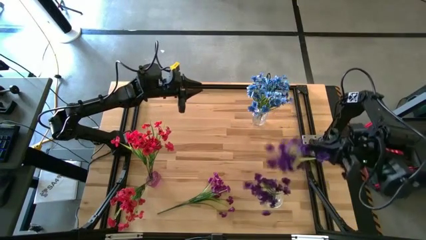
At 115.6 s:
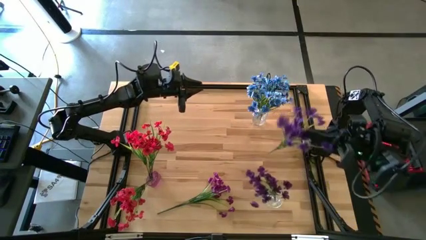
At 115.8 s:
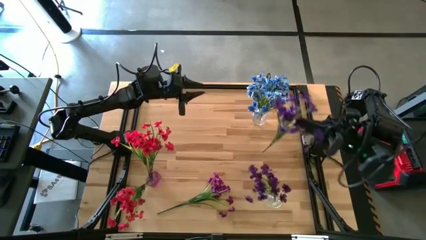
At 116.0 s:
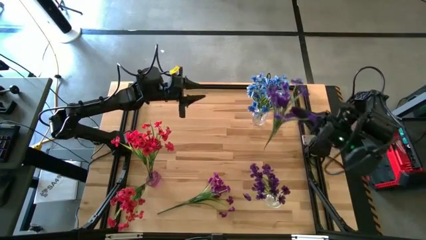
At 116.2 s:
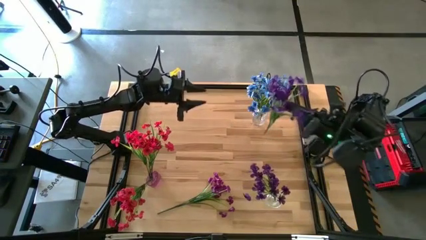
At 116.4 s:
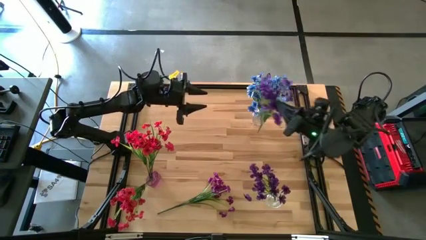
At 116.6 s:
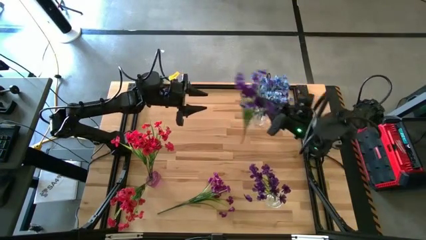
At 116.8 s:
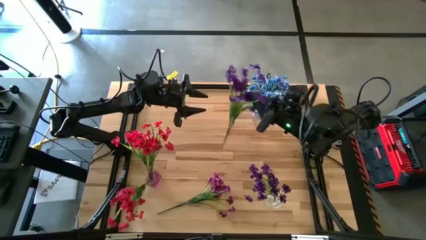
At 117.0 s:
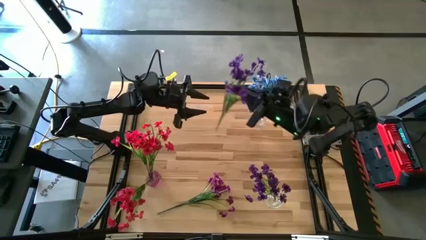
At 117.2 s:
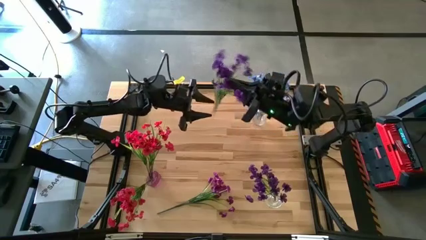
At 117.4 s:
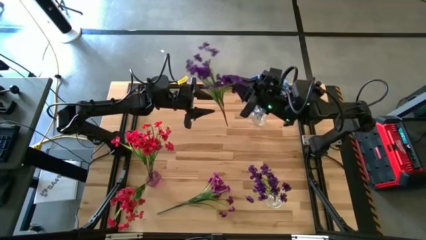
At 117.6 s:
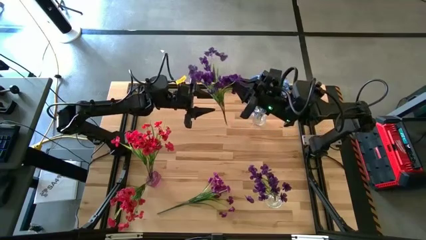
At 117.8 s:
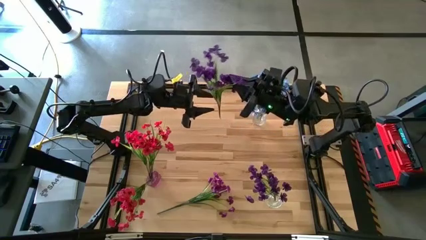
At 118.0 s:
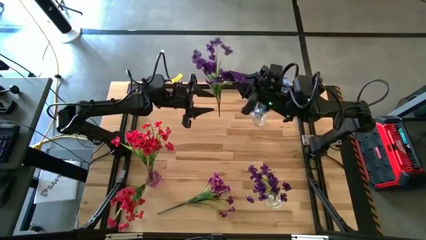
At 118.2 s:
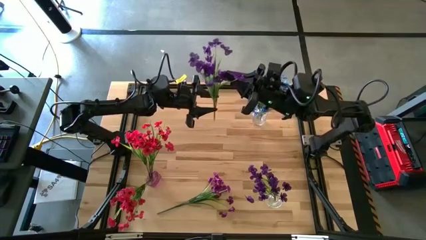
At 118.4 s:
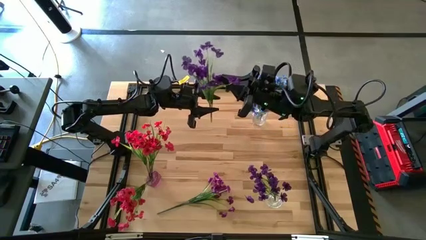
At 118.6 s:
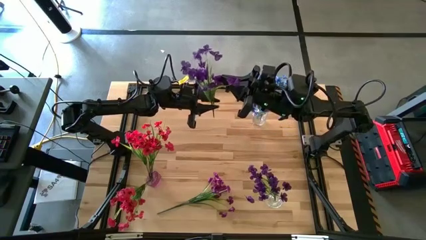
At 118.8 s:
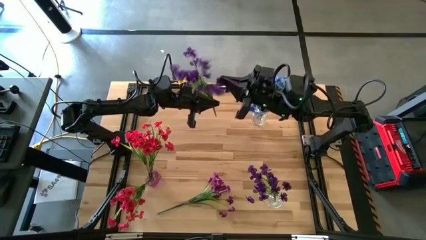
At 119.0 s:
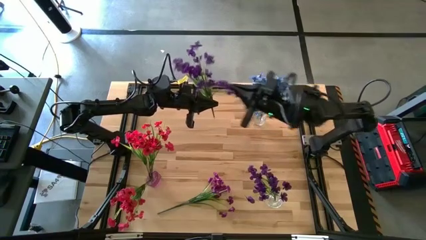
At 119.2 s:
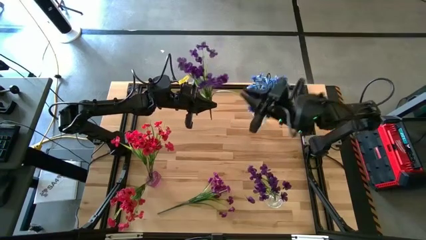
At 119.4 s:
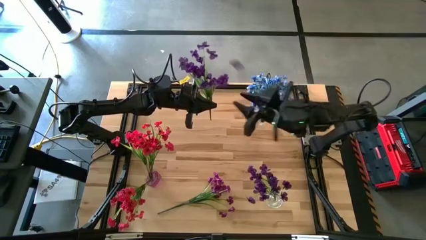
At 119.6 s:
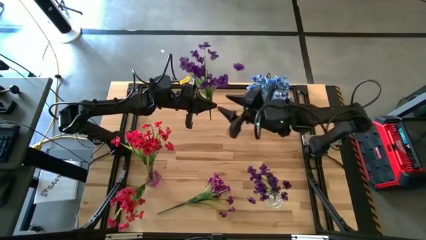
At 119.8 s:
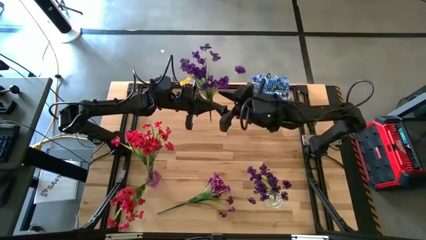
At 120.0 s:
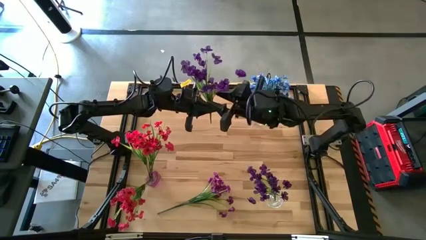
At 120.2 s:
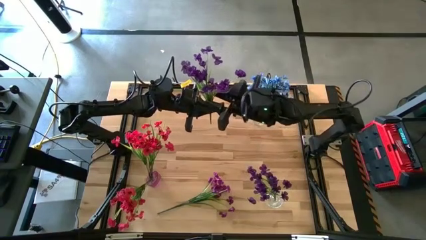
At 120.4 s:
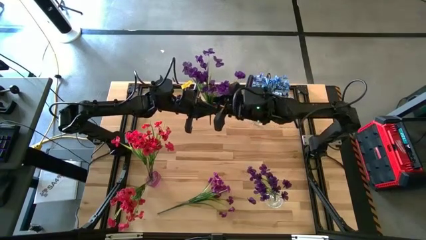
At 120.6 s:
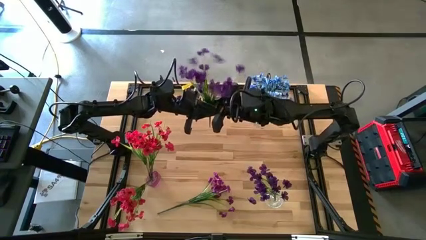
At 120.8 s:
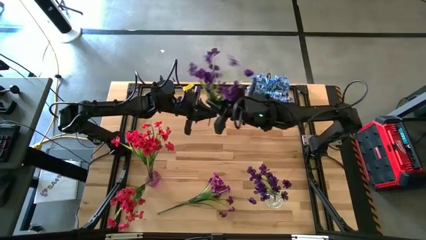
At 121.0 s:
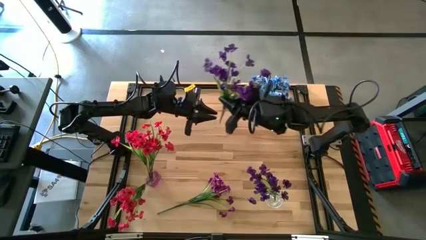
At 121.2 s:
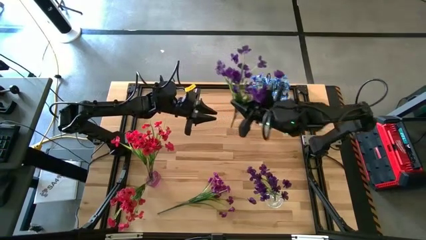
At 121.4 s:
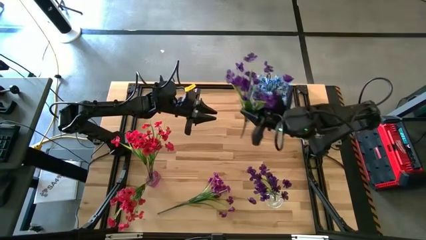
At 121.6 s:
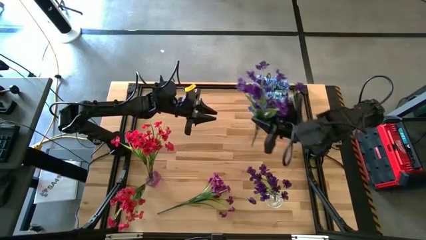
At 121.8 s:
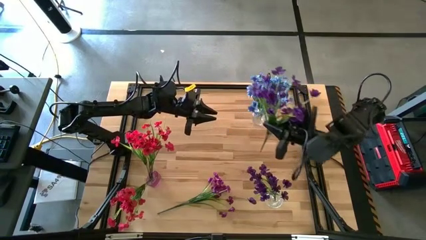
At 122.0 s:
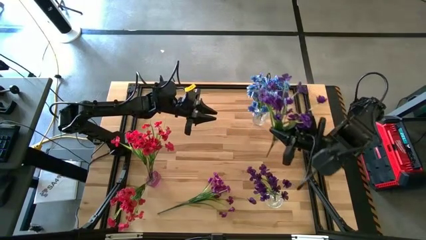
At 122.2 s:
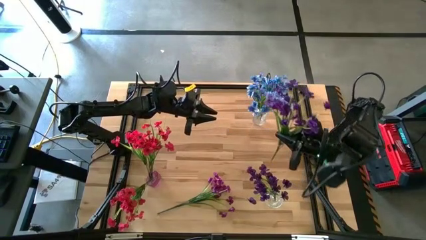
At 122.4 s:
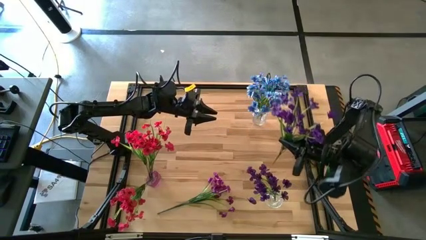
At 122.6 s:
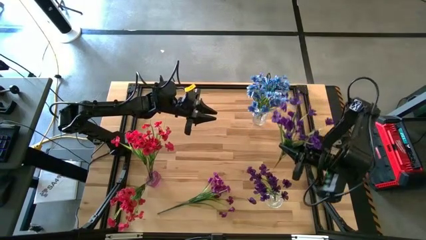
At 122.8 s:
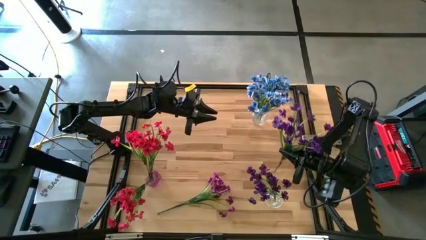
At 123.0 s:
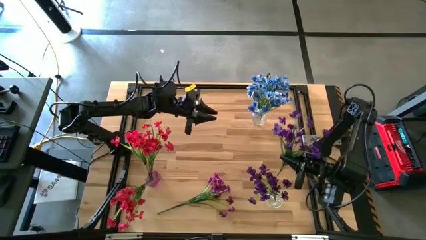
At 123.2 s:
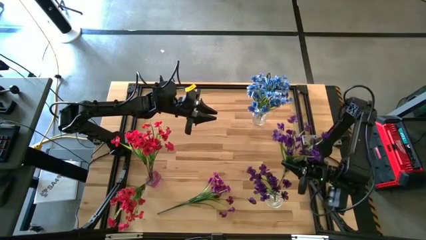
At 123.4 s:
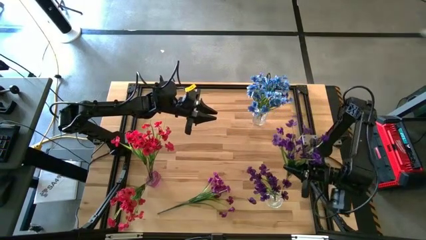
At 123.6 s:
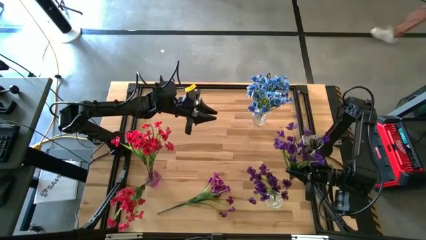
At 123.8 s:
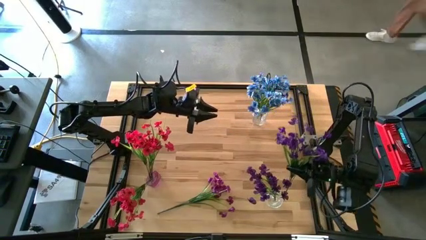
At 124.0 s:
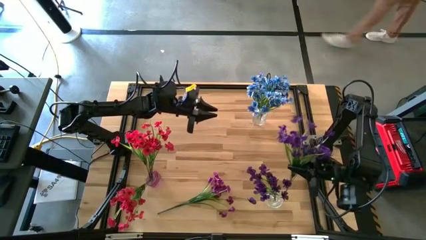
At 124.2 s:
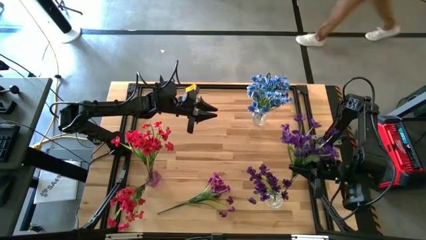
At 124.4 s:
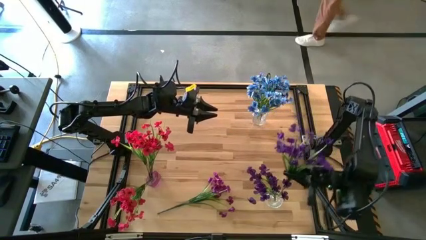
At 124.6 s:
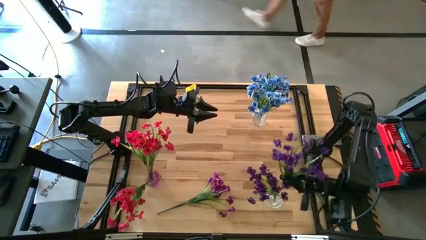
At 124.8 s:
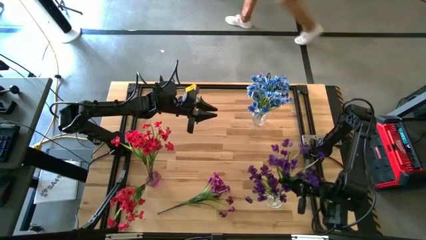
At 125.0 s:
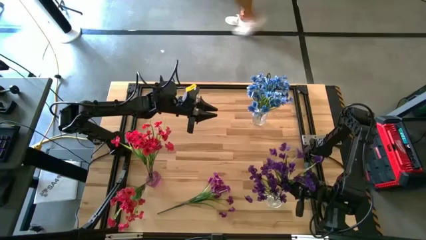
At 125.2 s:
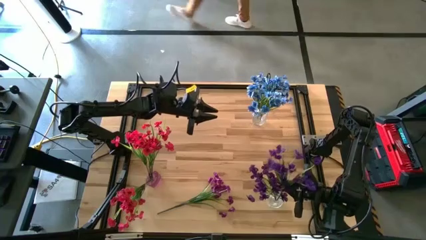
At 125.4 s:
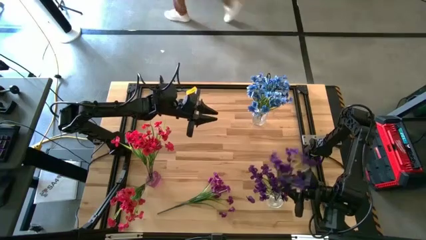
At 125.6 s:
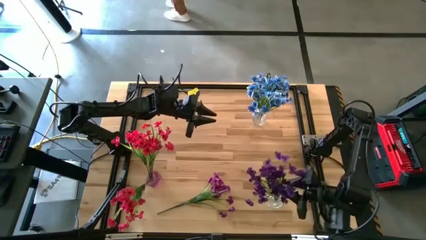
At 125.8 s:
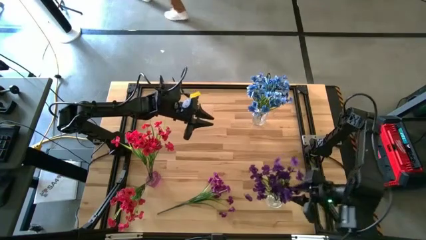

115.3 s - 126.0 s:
Task: Sort flowers into vase by color
Put the right violet flower into the bottom transparent flower vase
